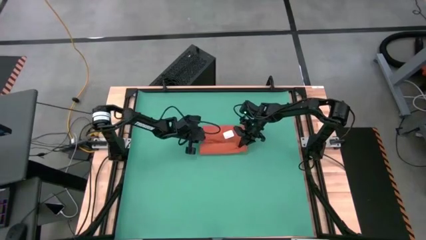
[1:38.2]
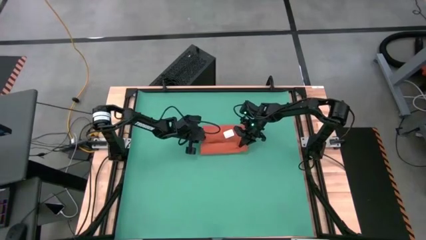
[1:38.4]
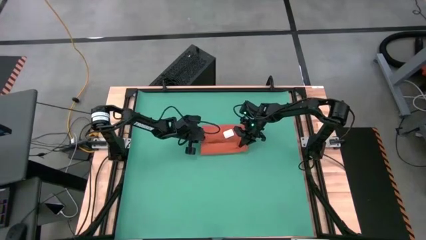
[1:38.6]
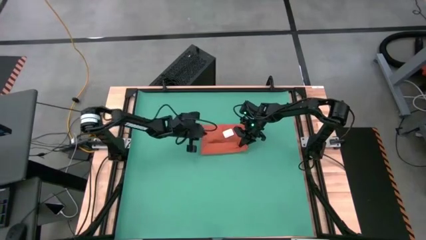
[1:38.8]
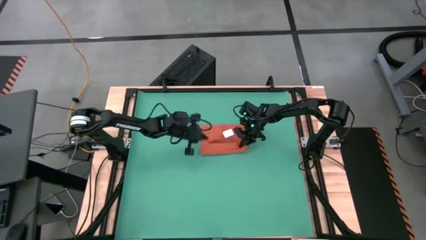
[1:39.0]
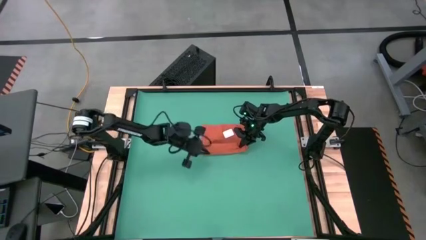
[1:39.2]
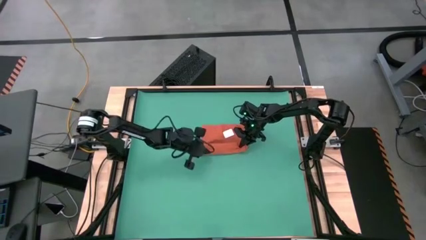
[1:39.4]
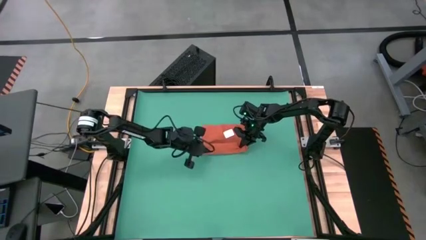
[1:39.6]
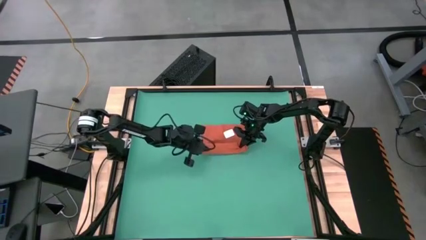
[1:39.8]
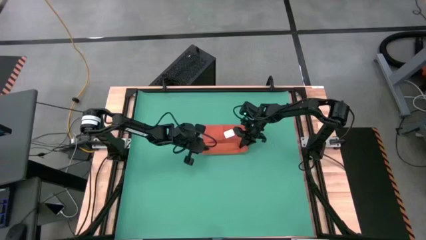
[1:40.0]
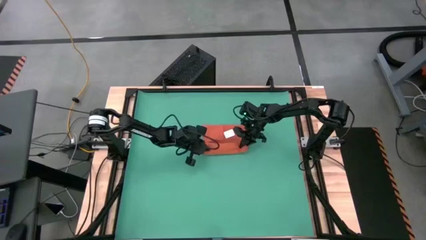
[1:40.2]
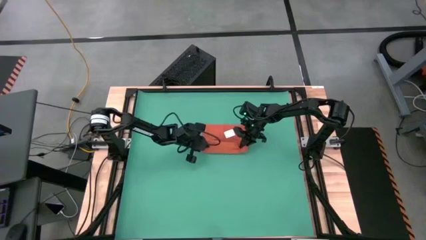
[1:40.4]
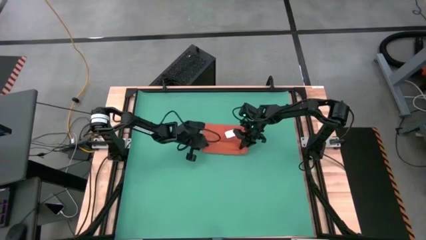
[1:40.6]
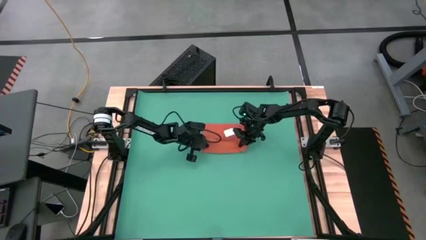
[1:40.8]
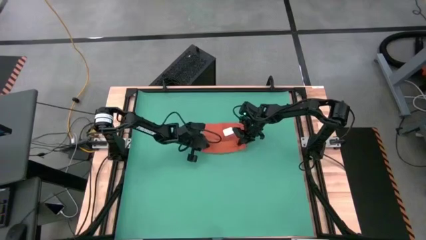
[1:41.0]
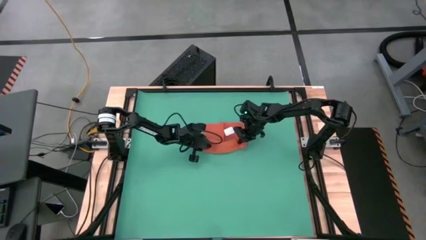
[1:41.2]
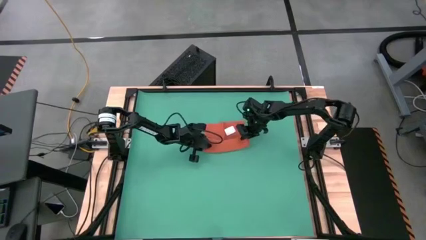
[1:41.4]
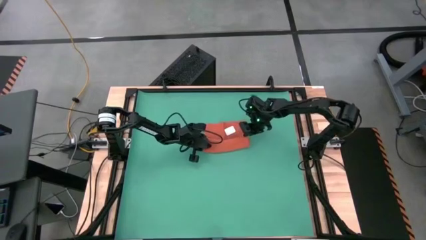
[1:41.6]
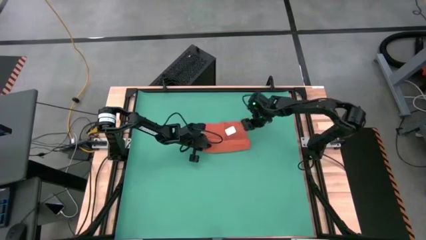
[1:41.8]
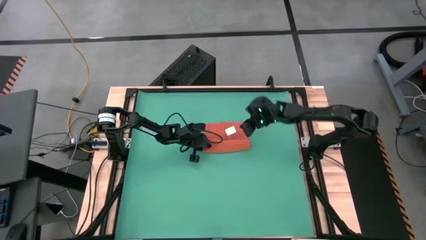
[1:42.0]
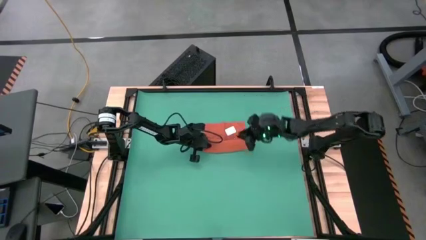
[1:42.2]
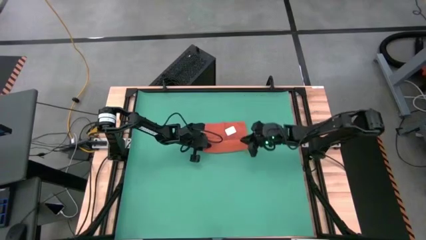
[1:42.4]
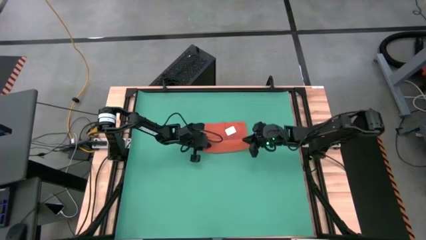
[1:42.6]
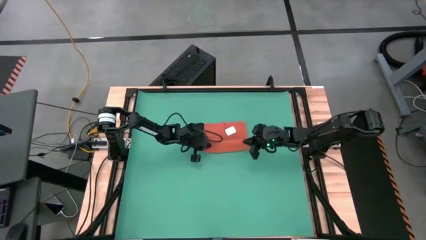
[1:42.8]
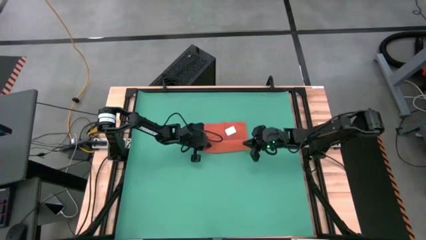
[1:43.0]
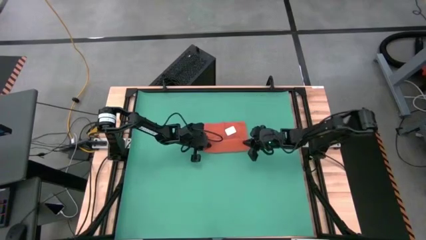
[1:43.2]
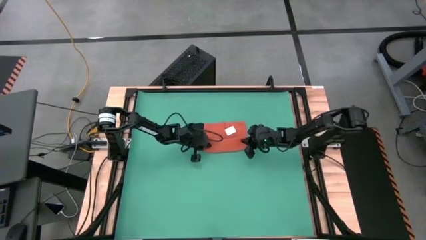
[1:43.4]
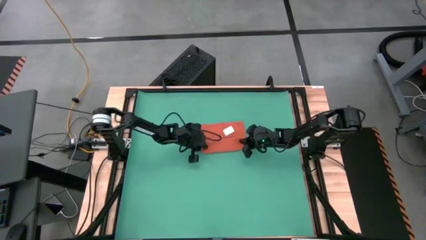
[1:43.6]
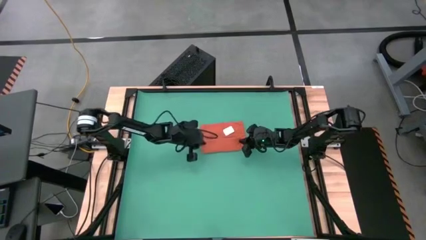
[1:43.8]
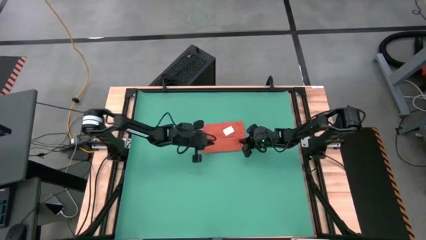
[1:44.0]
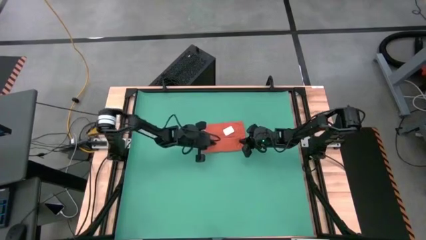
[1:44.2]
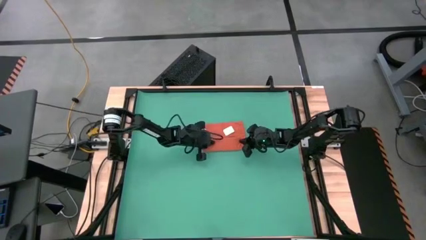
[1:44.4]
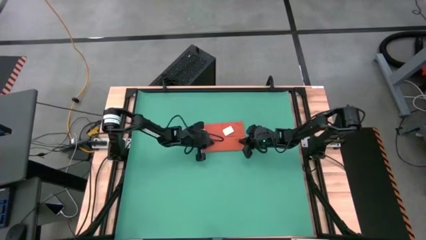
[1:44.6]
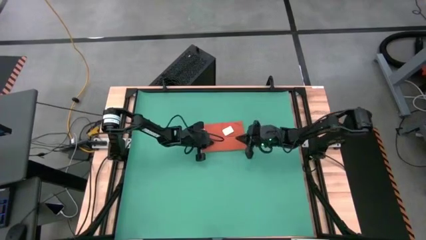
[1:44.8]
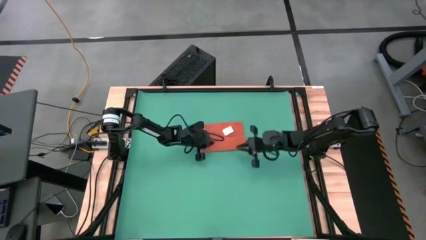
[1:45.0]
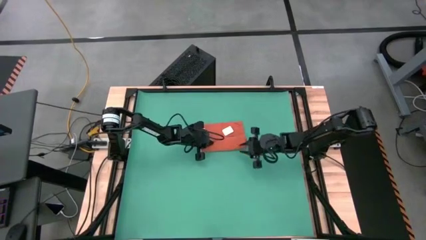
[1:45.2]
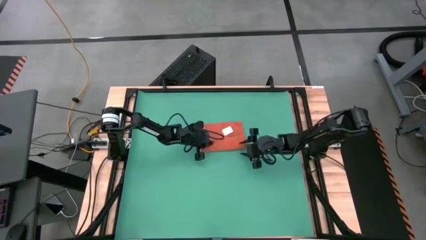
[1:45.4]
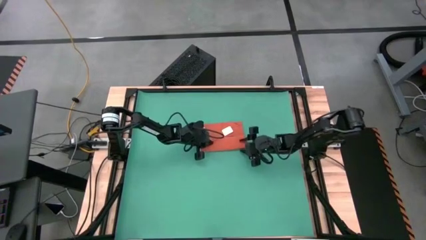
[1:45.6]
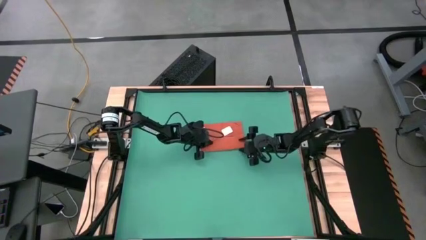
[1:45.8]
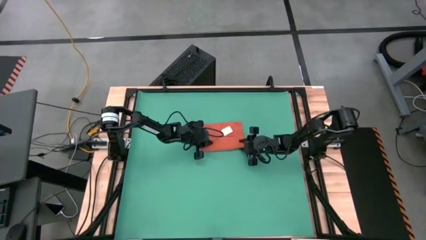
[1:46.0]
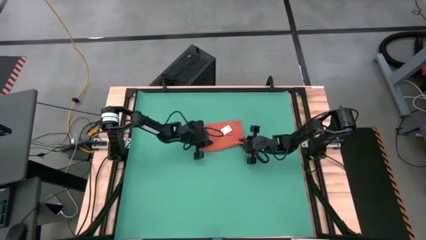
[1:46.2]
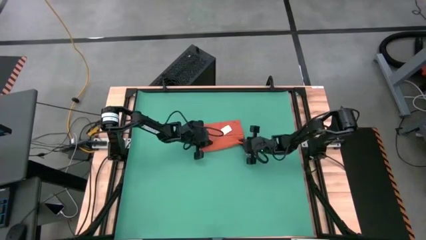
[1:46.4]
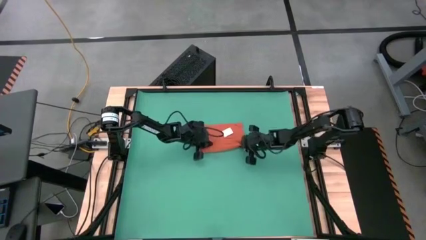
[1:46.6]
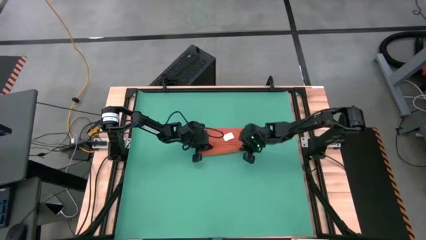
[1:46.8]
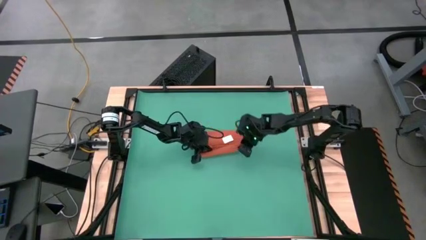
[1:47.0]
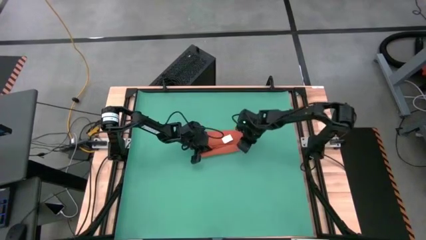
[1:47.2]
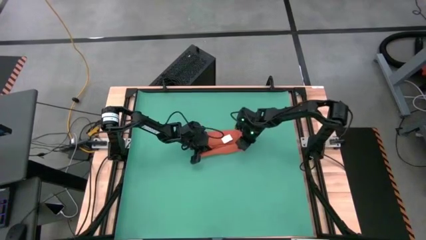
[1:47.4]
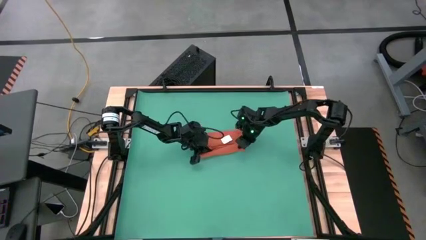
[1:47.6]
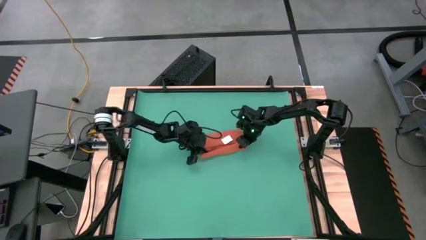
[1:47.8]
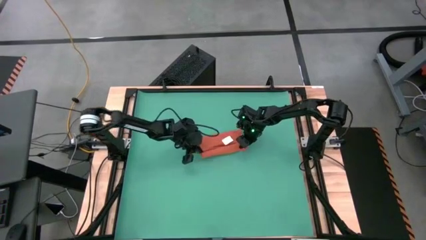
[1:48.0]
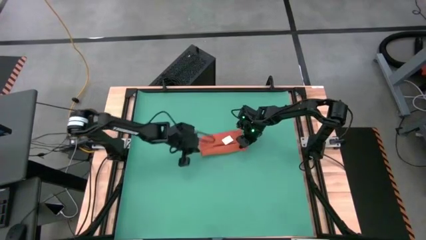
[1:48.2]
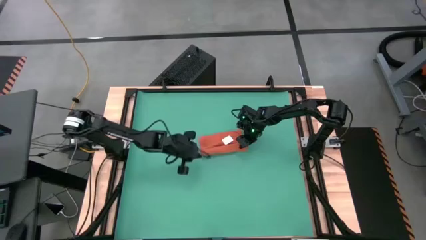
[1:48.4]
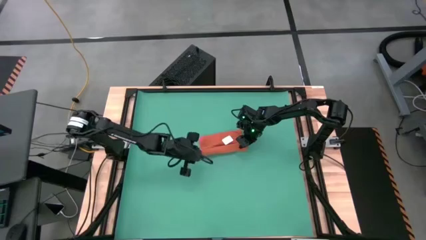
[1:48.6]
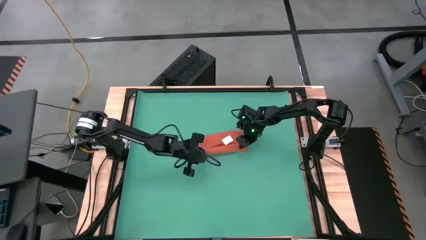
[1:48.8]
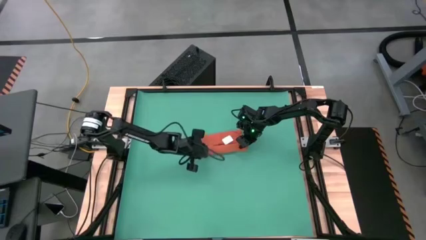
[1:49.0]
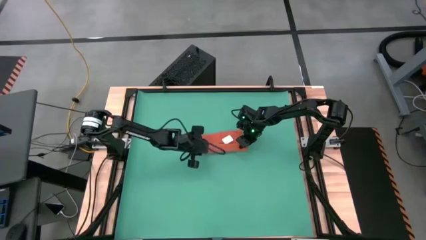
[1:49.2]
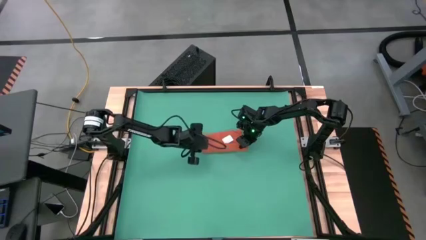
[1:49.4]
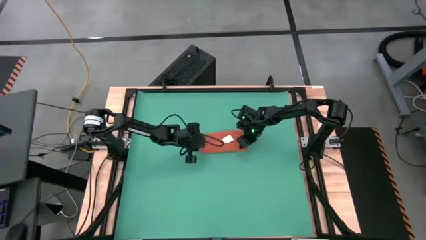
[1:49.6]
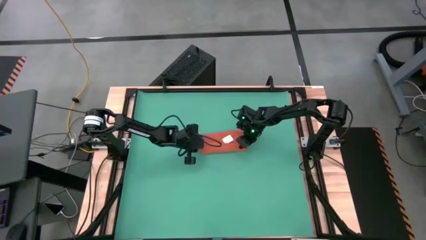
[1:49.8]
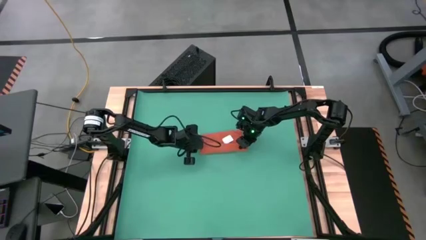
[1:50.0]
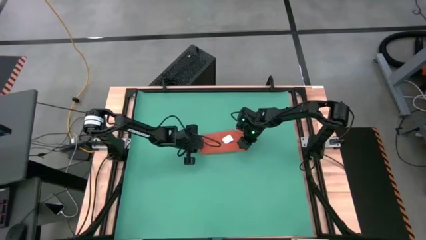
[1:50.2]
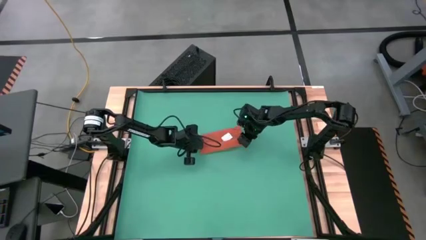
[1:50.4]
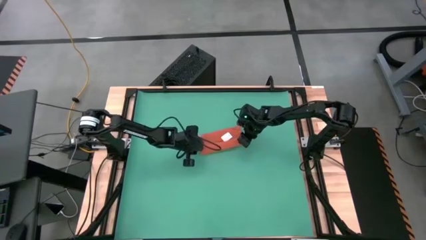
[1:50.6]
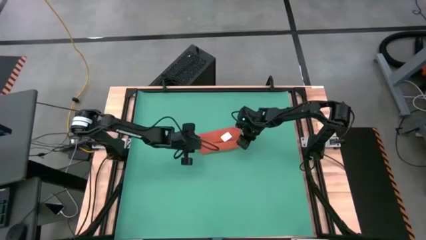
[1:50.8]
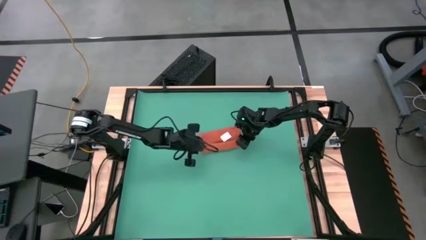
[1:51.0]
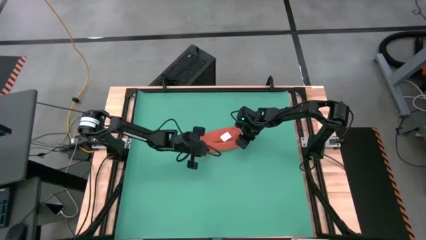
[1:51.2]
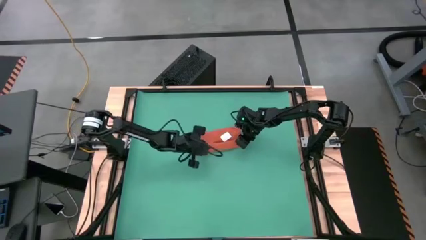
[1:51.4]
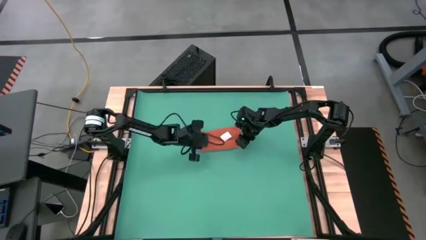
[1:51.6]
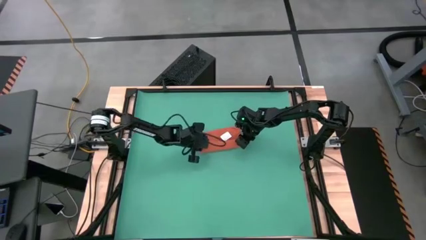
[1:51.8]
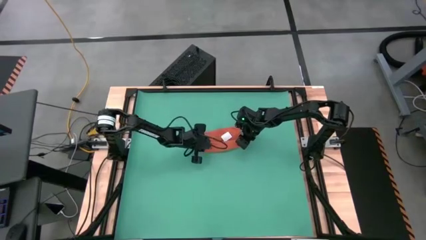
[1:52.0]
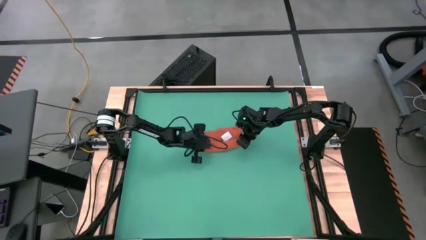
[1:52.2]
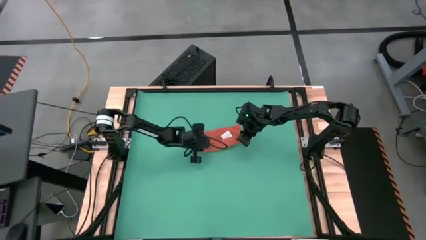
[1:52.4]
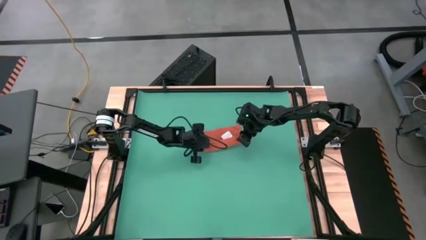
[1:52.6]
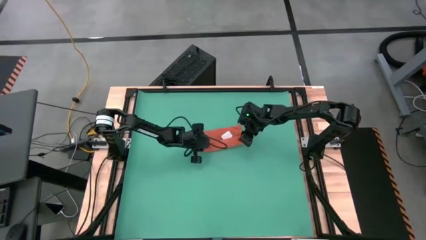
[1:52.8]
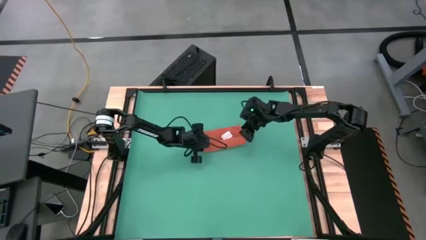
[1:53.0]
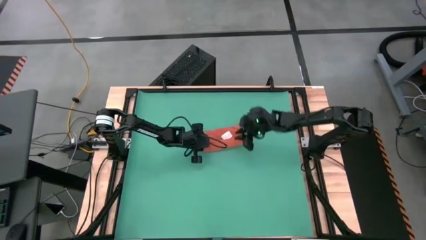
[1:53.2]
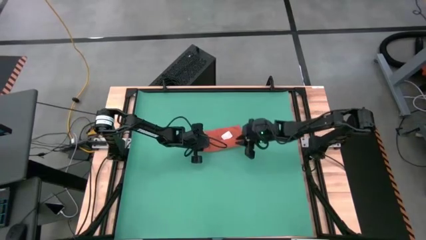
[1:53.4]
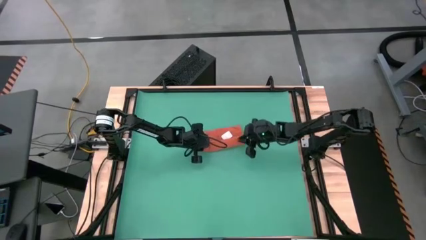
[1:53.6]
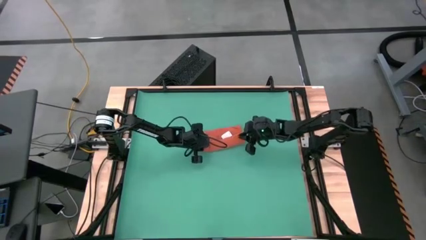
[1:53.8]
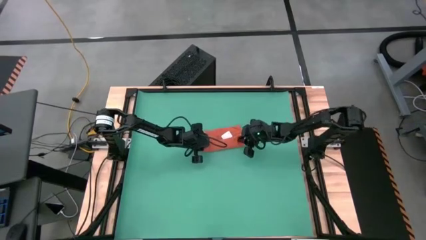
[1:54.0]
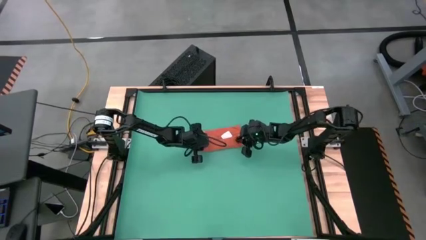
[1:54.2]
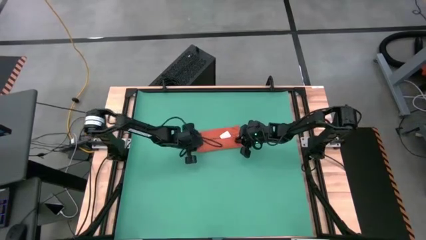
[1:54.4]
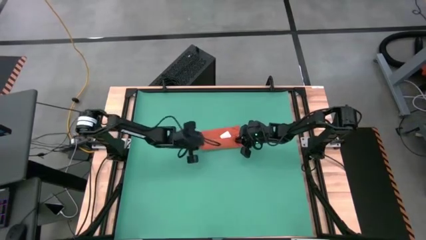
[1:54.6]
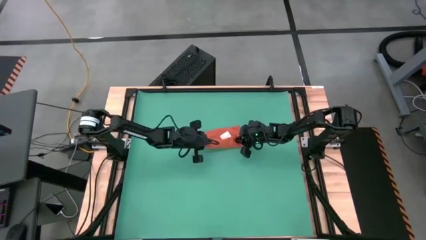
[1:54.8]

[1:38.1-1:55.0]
Task: Roll towel
Roll the orange microfiber towel
